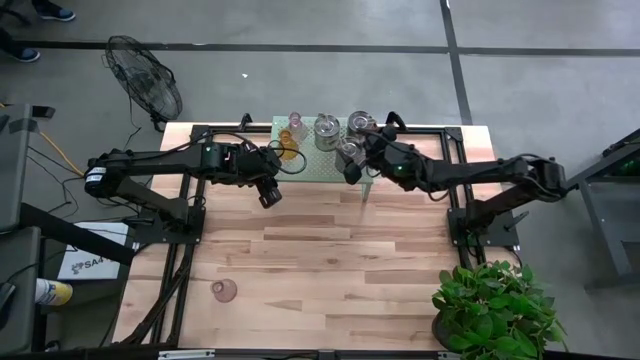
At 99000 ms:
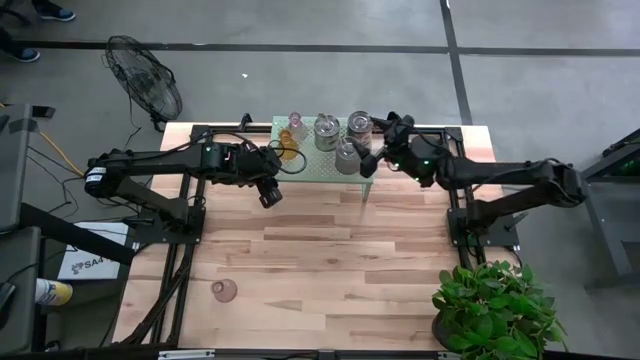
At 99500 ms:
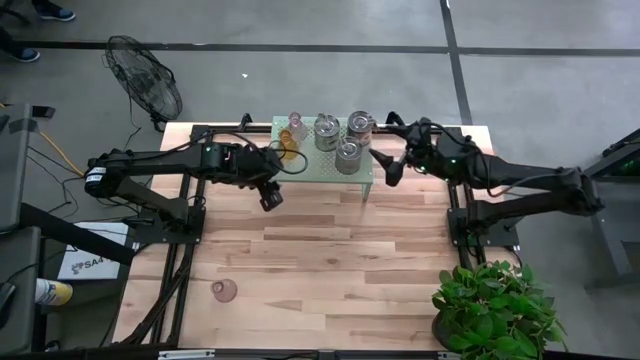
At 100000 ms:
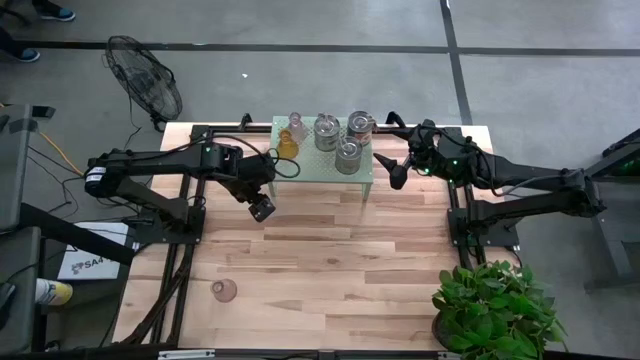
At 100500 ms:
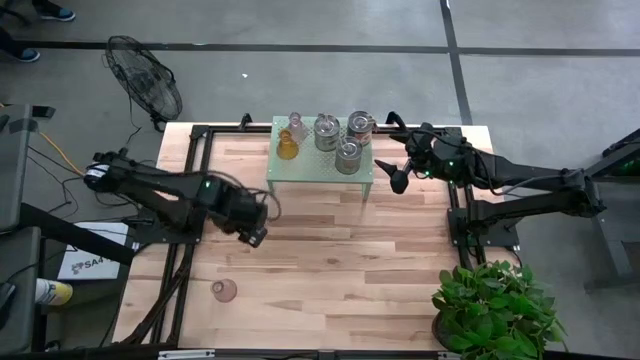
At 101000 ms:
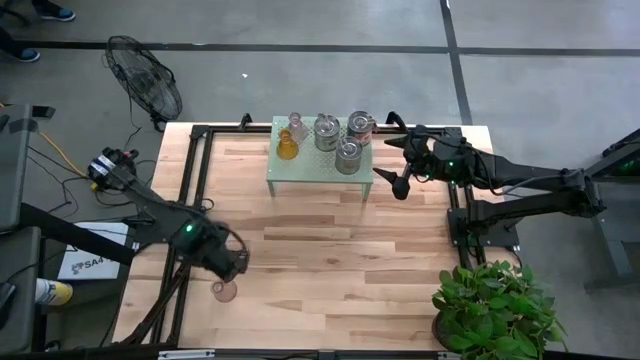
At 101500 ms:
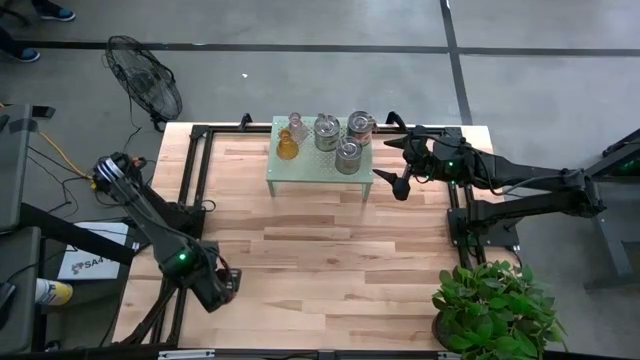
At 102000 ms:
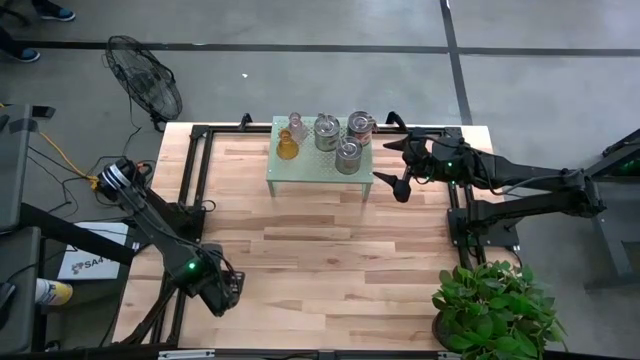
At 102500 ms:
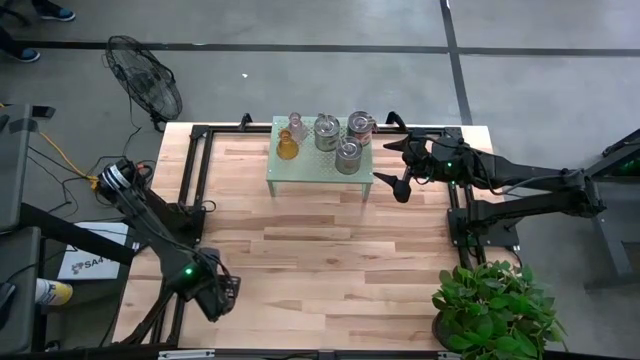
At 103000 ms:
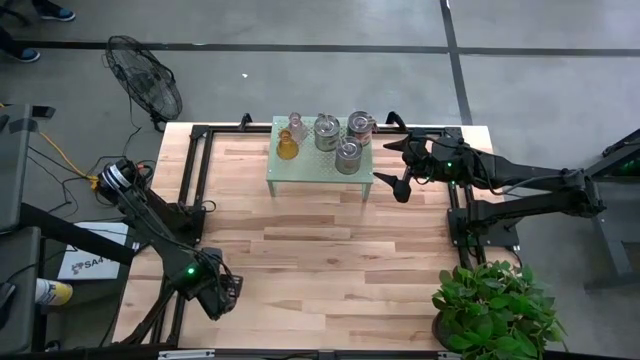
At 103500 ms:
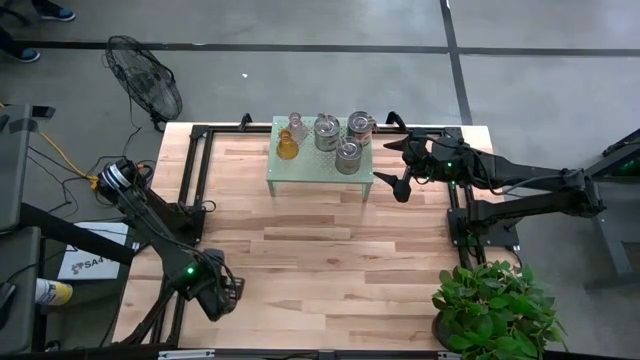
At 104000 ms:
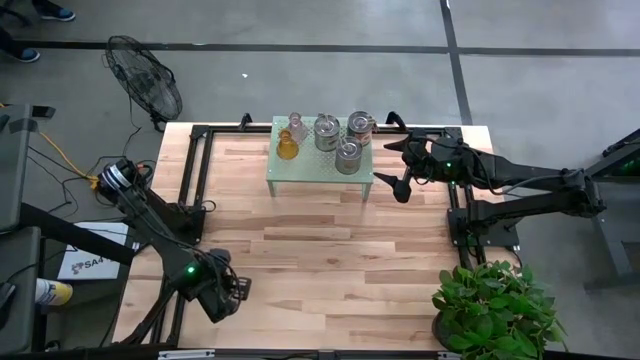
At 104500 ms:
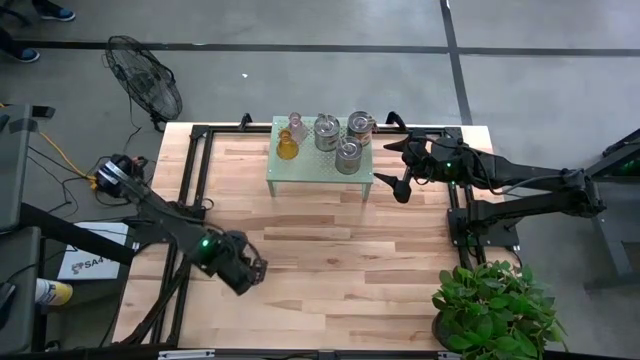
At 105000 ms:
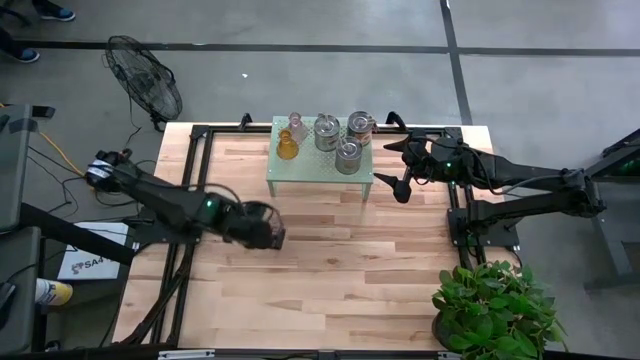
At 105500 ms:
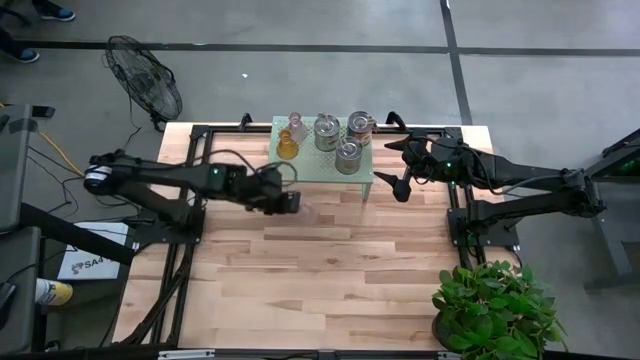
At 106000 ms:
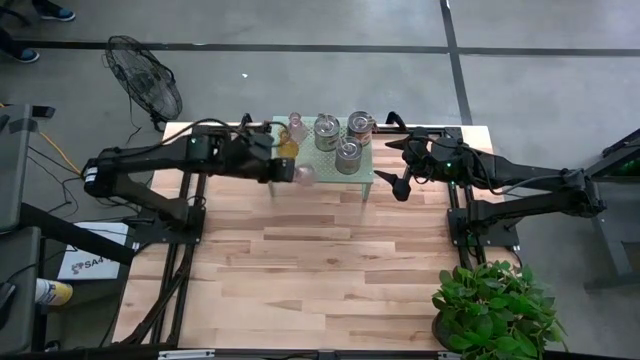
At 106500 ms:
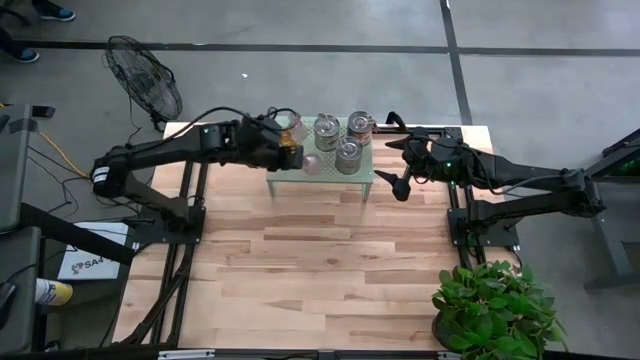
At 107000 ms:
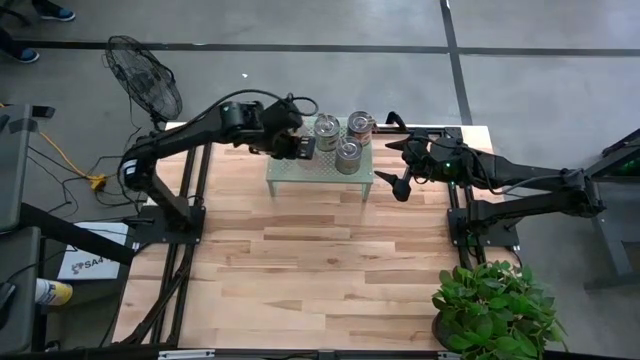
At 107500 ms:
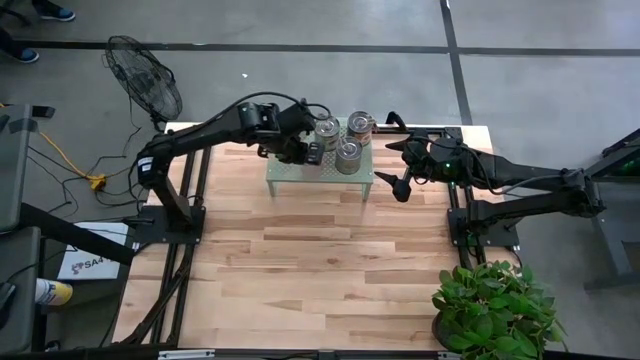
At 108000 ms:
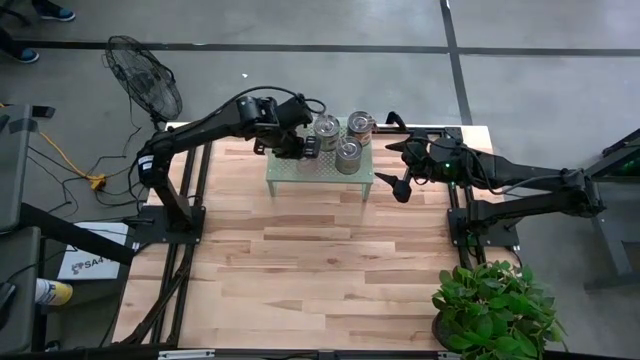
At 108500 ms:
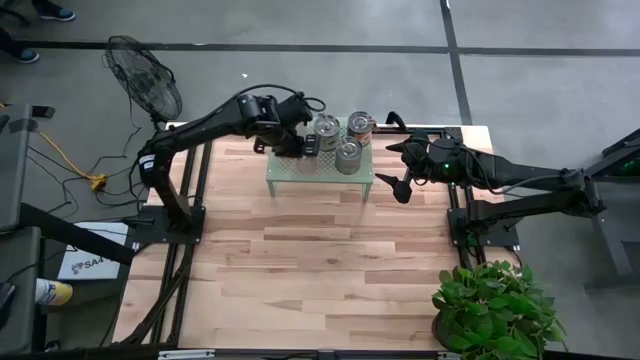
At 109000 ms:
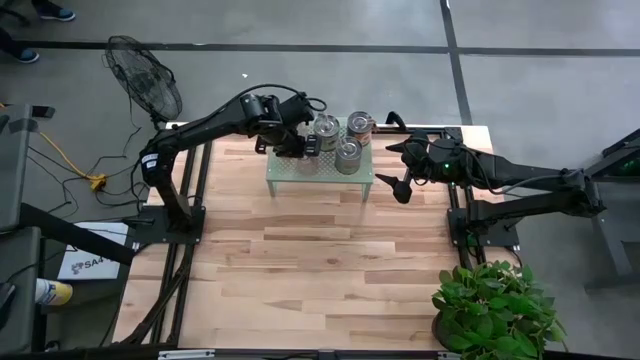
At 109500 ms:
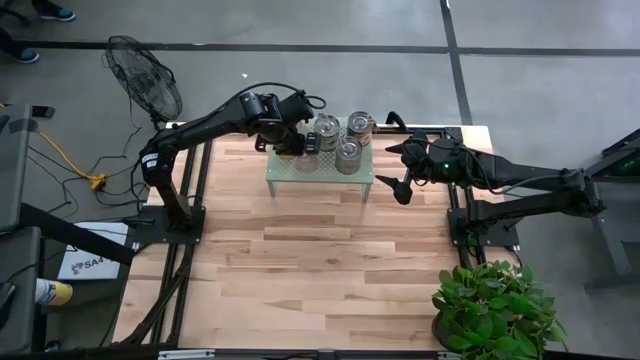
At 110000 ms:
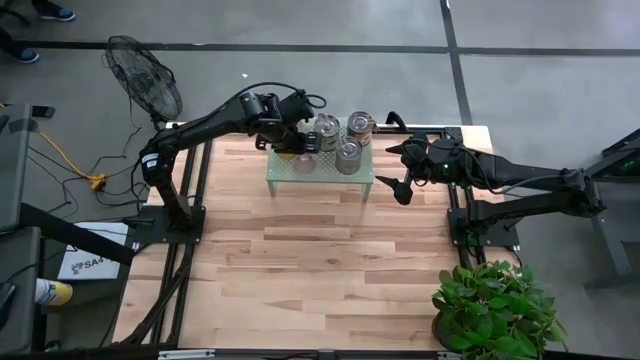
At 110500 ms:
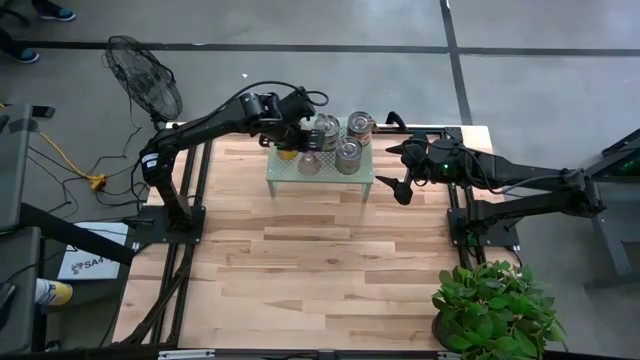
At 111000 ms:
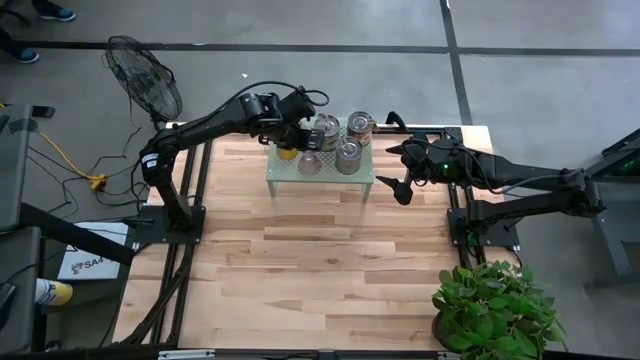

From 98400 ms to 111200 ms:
Task: Pick & Place candle stick holders
Put the pink glass candle holder on the shelf

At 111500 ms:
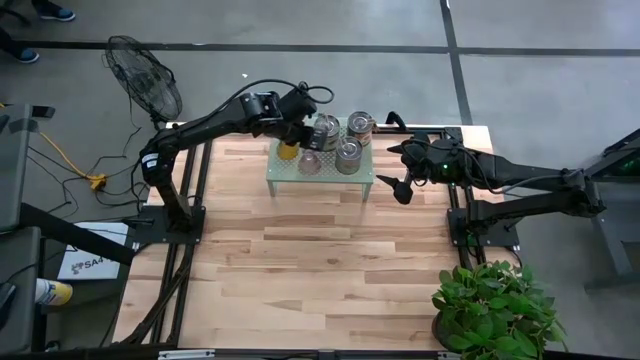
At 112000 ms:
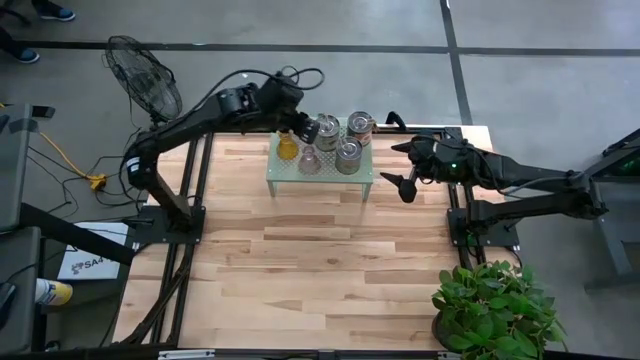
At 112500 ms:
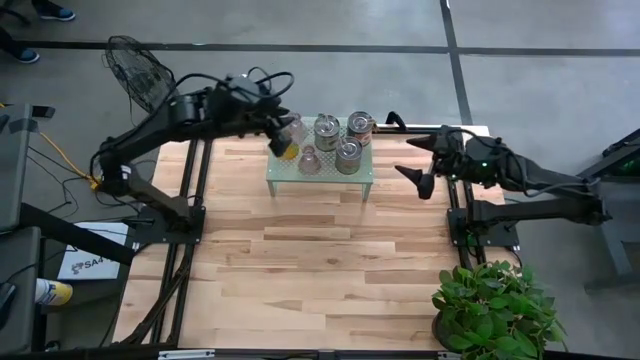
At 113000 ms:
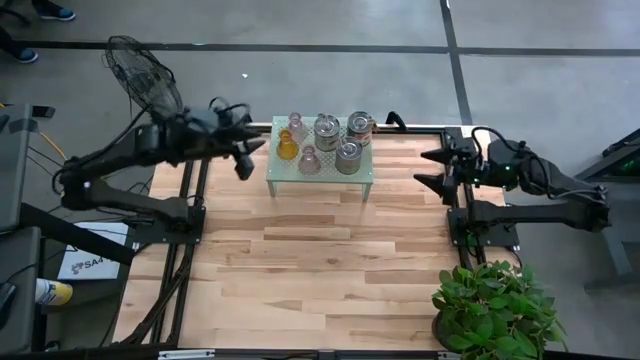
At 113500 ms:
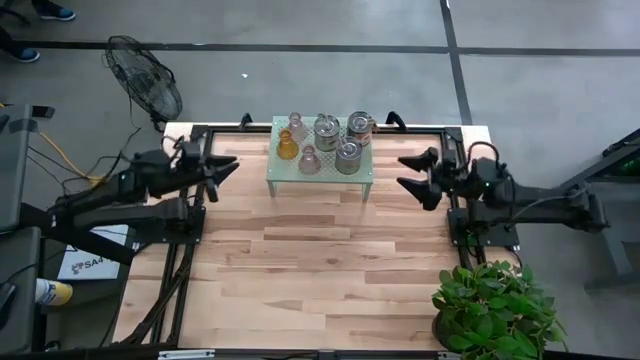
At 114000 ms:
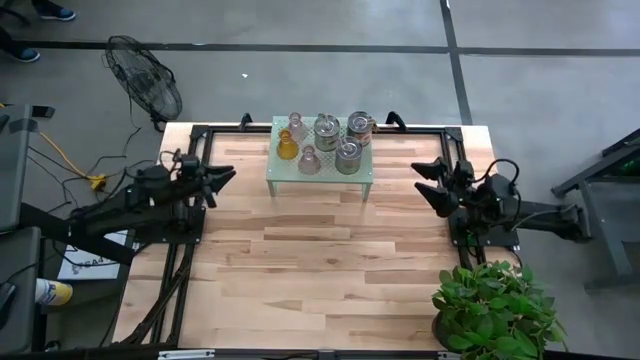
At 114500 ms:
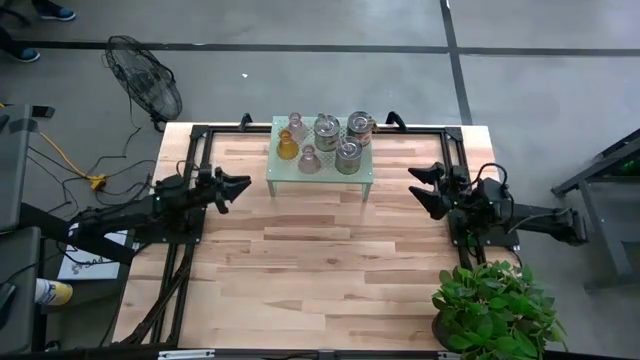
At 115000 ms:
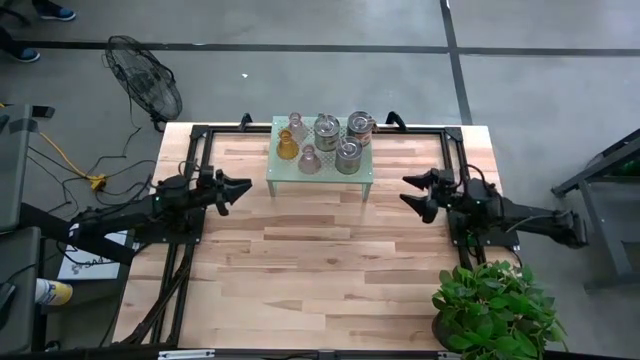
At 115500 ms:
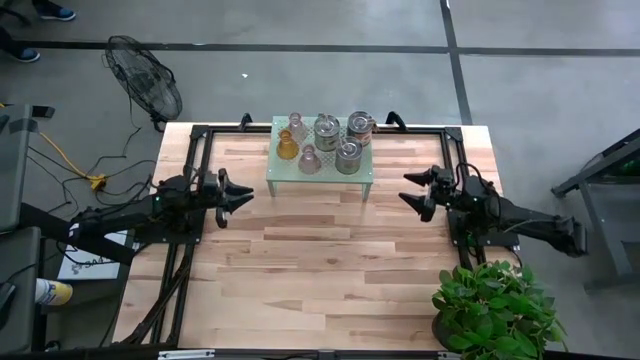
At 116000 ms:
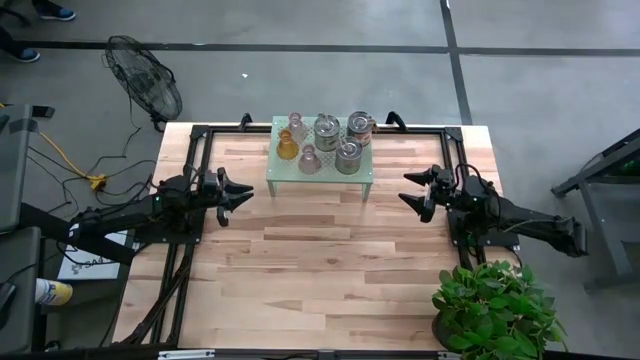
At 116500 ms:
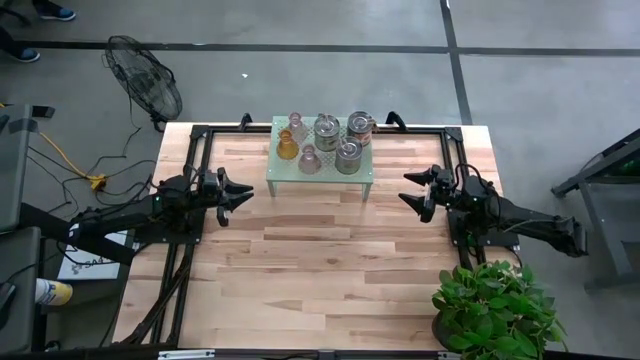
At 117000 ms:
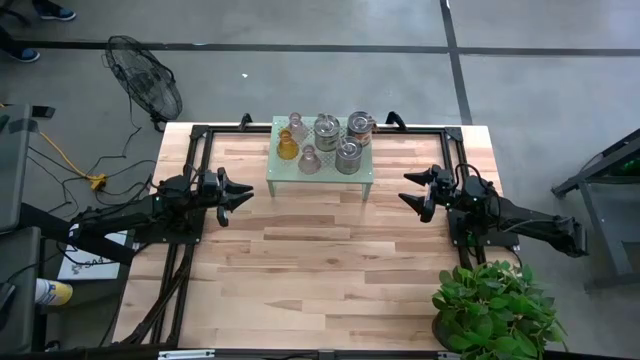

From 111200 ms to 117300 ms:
Return to Home Position

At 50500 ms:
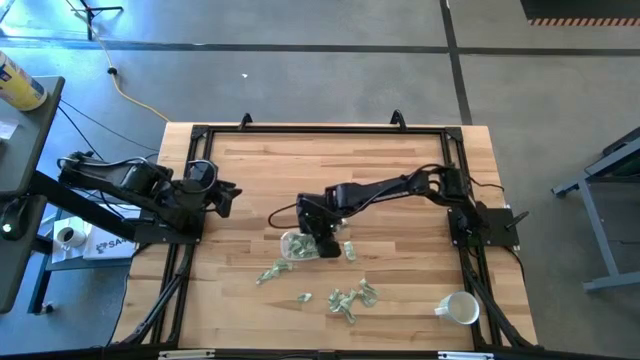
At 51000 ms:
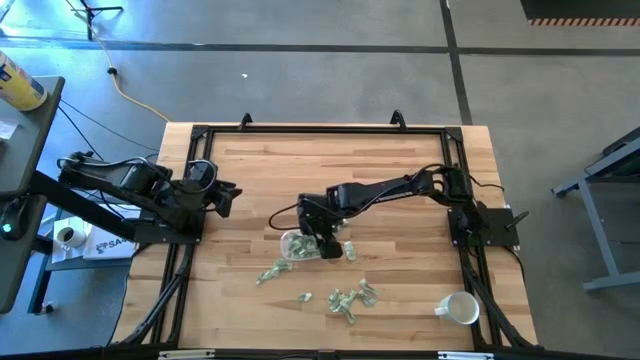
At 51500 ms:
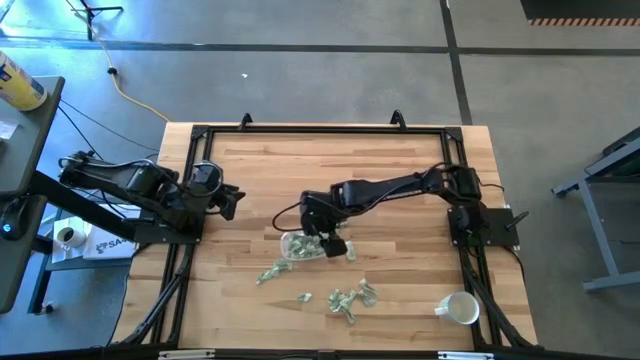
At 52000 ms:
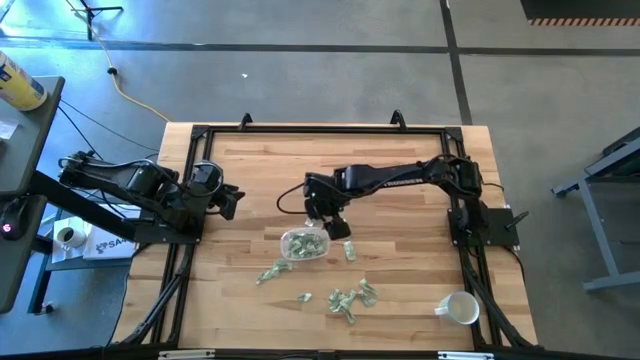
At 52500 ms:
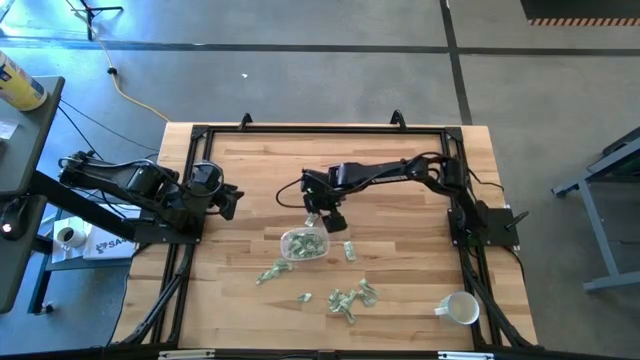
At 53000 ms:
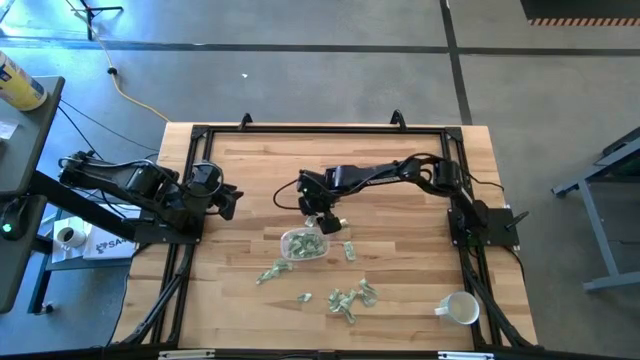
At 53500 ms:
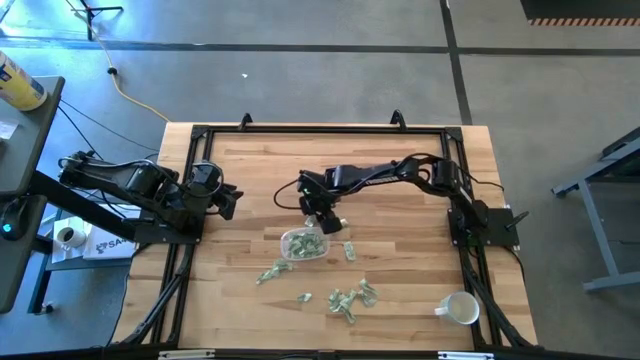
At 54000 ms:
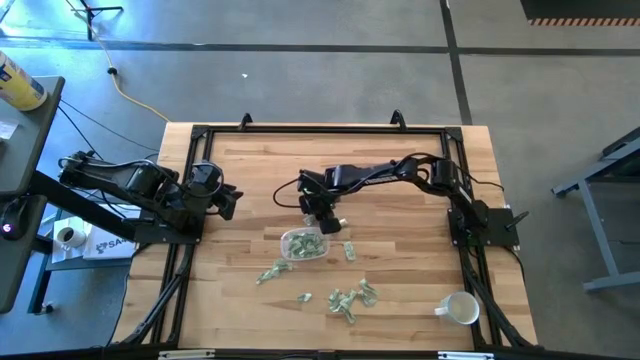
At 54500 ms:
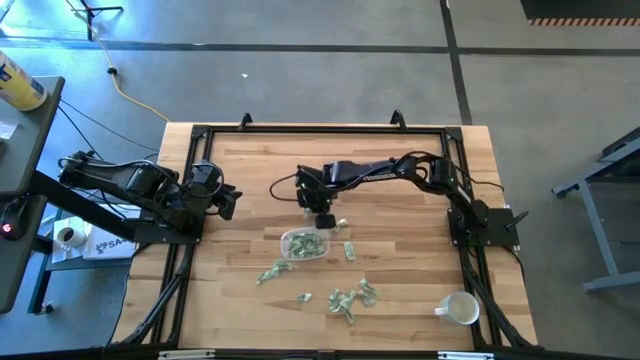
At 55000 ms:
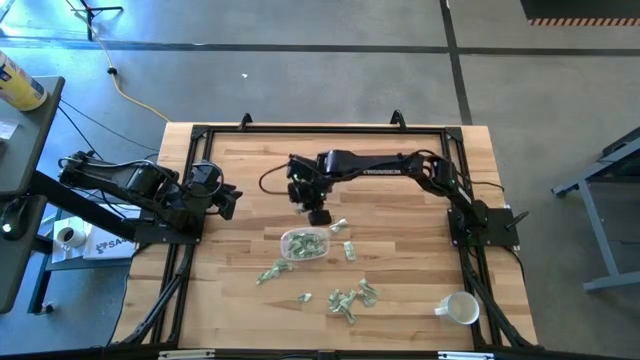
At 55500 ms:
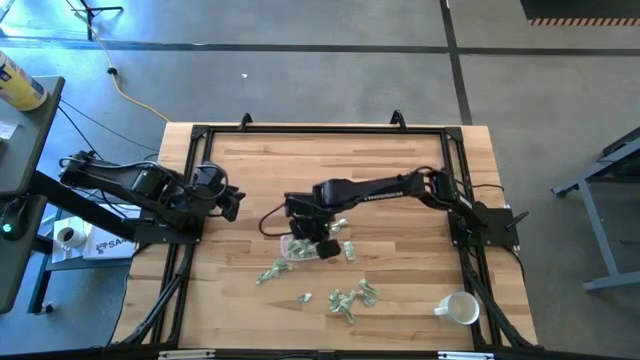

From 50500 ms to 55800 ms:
Task: Pick and place Stevia / Truvia into bins
Put the green stevia packet into the transparent bin
